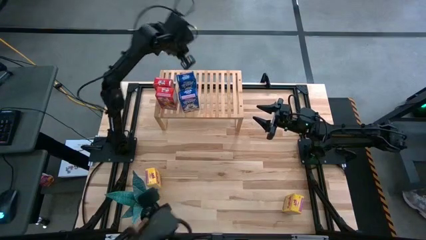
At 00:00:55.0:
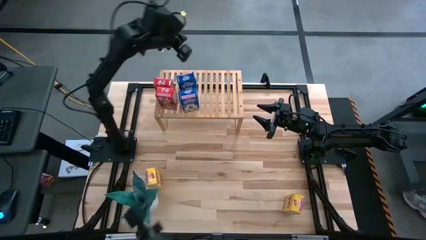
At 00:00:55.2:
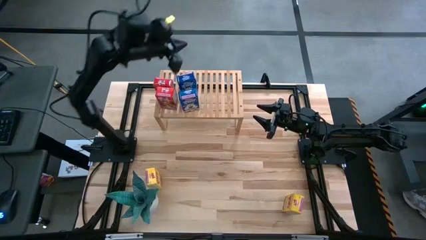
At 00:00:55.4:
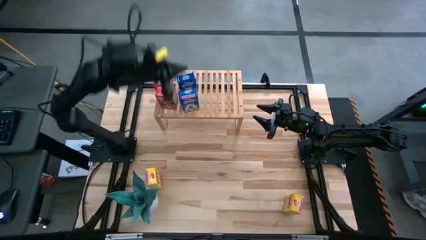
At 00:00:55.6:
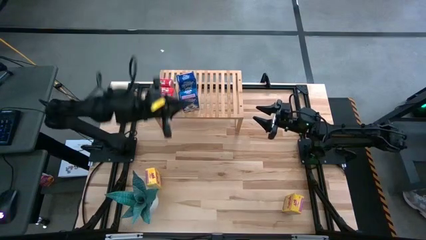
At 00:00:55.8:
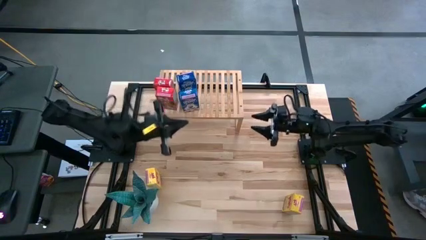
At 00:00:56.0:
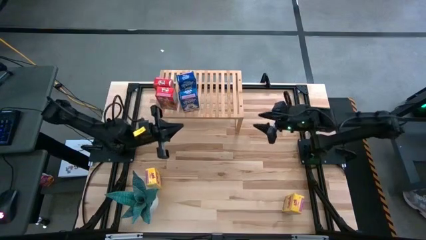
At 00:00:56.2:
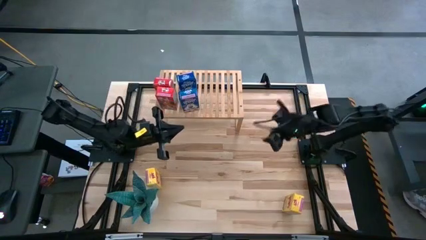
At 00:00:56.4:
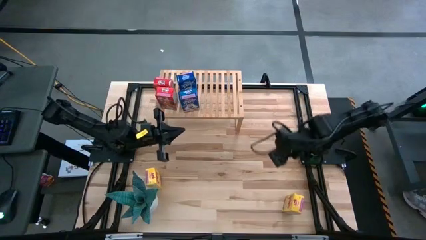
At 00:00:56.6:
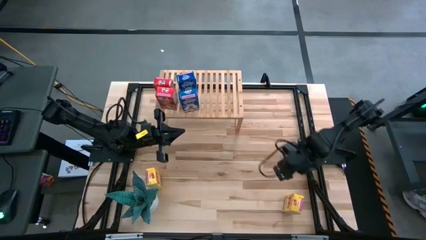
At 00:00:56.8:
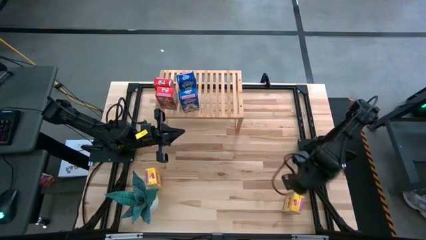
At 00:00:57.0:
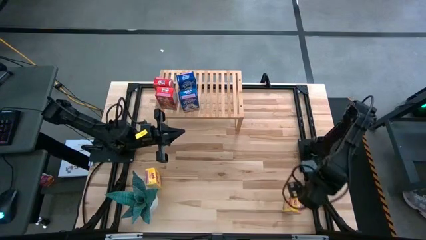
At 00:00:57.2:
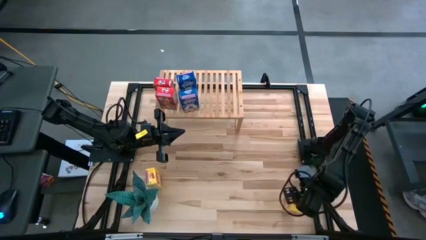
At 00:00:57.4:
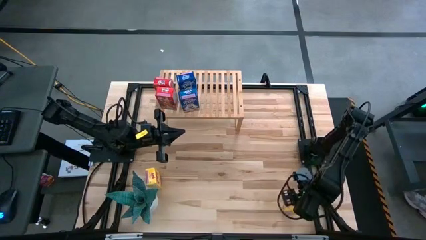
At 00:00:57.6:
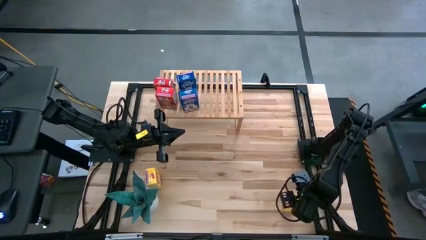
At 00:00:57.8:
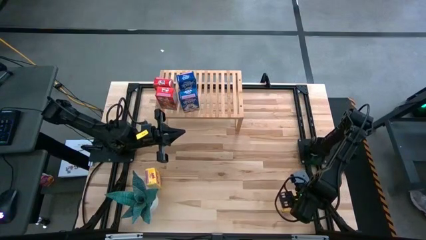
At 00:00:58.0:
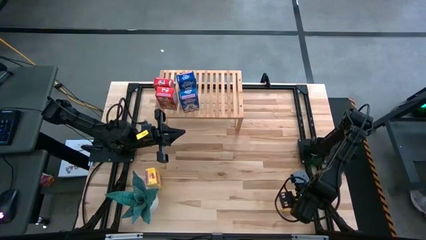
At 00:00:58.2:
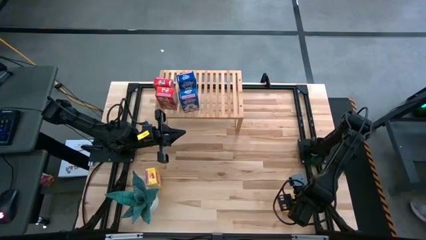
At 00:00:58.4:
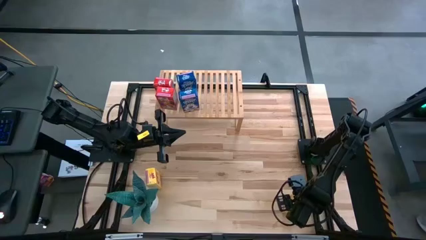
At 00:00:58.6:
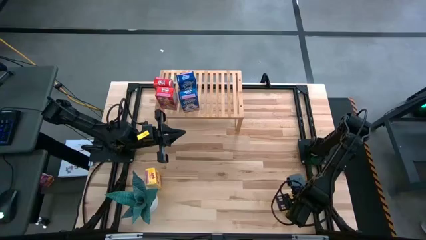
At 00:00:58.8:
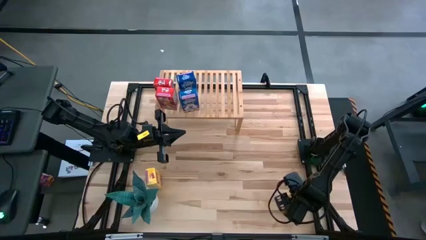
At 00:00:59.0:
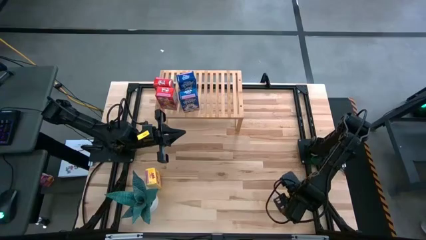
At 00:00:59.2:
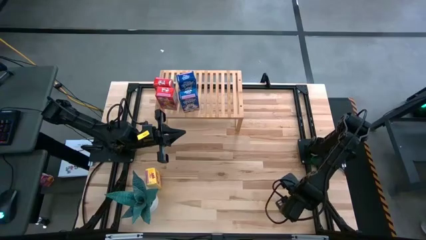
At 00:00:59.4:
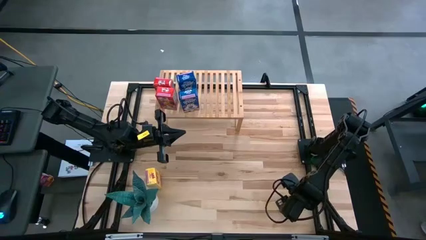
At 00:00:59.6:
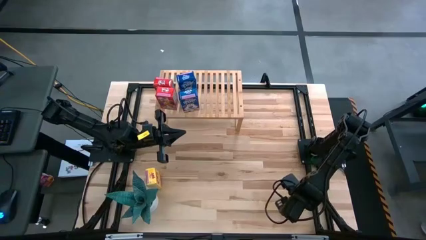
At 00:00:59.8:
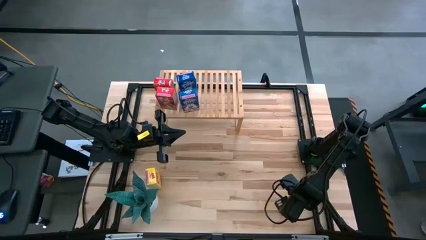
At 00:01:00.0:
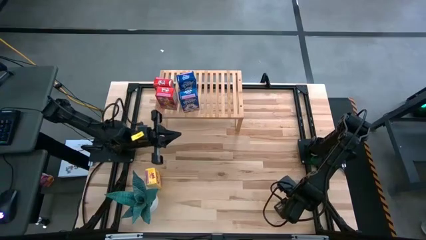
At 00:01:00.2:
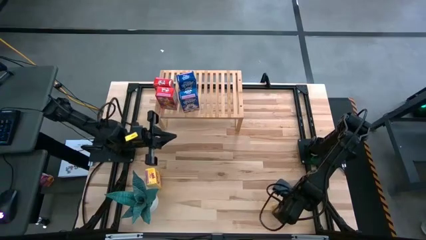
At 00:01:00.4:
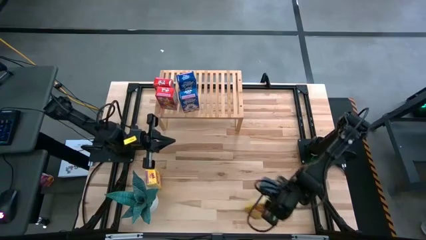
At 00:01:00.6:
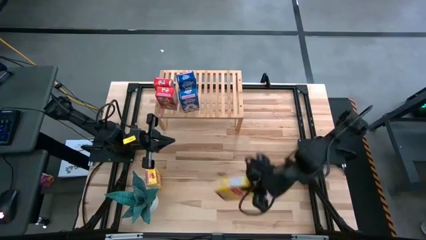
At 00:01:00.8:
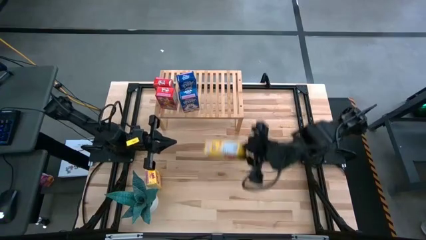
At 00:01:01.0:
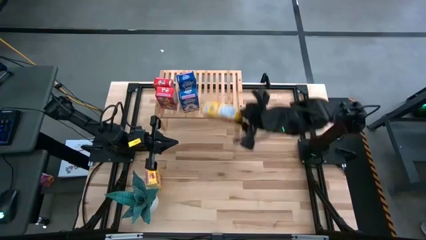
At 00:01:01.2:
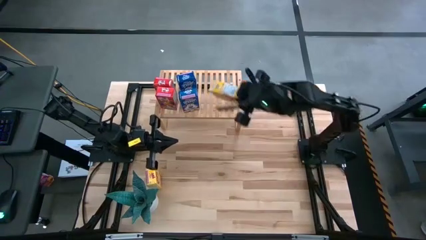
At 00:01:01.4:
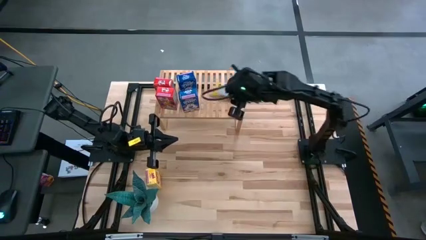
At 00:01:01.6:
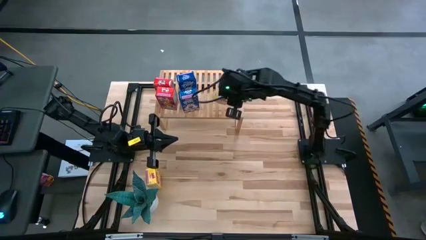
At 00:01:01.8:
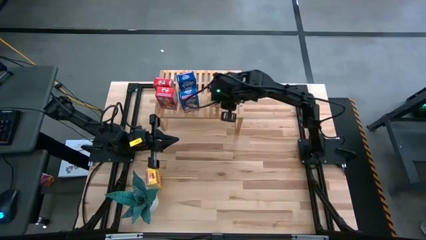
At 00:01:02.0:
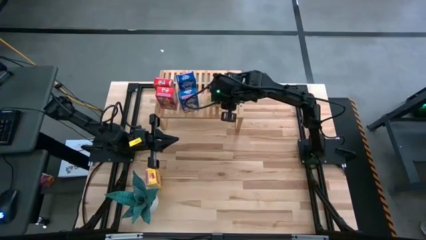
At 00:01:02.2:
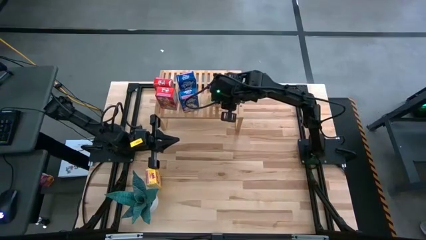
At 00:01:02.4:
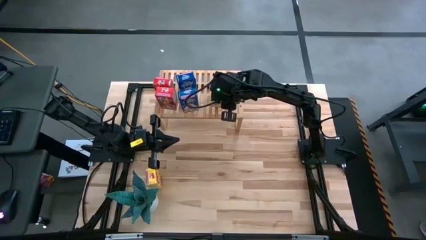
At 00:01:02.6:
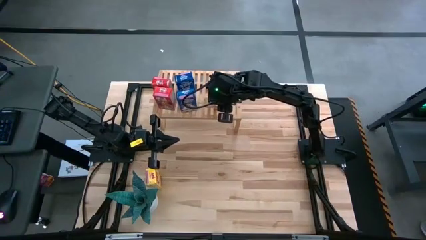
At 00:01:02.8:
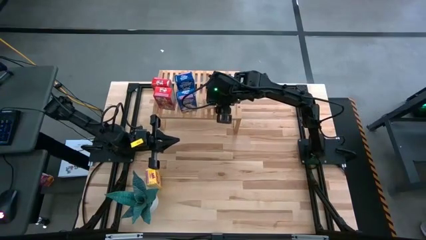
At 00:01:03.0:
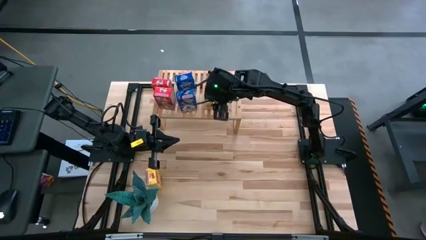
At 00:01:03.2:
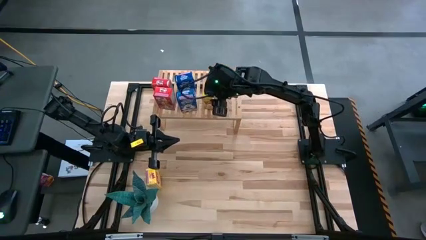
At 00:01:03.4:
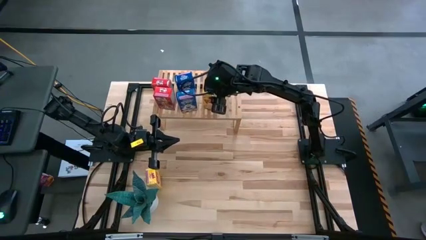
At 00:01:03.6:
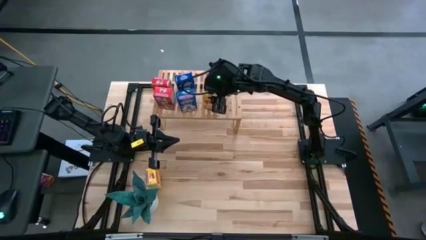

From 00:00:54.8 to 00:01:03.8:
Task: Stack cereal on shelf
Put the right yellow cereal box on the shelf

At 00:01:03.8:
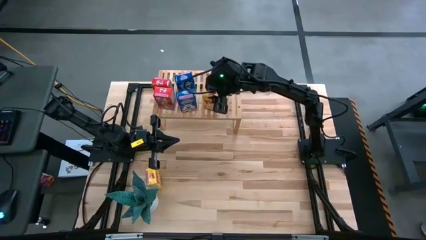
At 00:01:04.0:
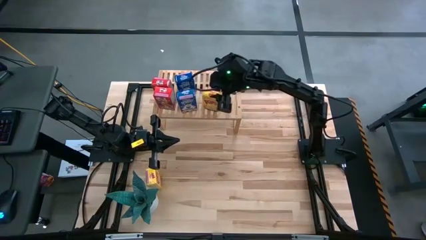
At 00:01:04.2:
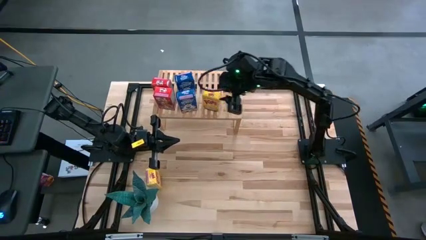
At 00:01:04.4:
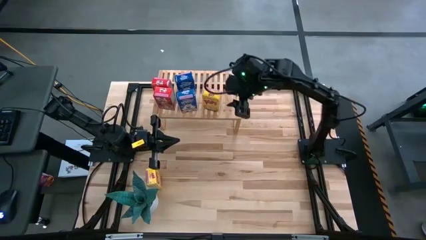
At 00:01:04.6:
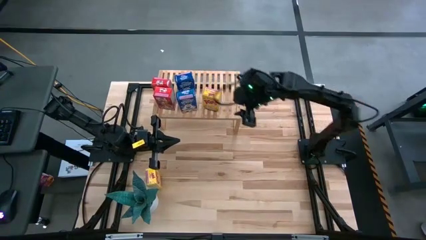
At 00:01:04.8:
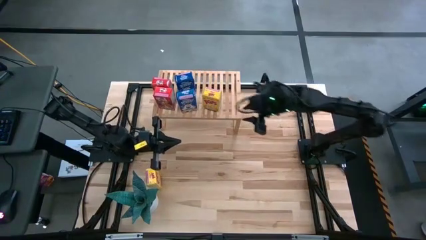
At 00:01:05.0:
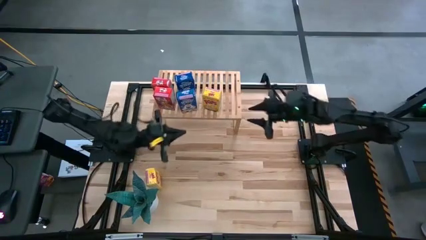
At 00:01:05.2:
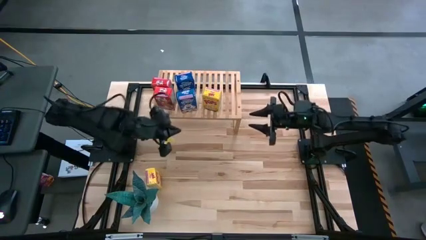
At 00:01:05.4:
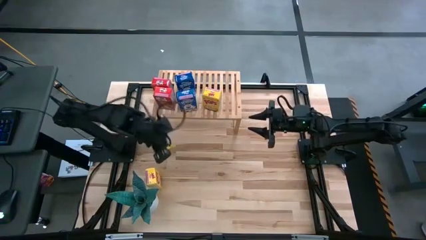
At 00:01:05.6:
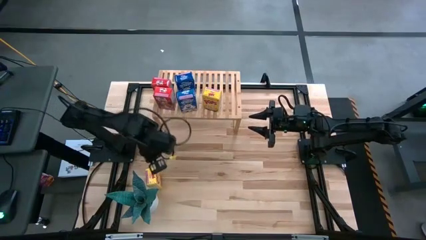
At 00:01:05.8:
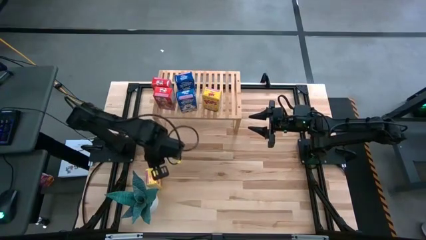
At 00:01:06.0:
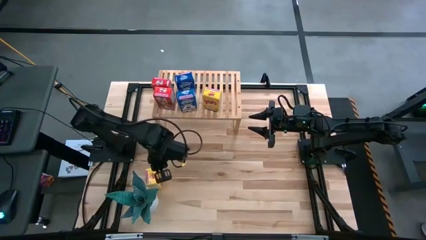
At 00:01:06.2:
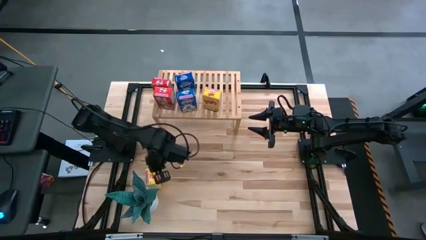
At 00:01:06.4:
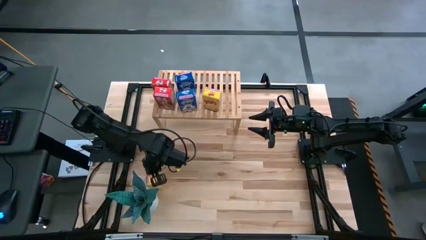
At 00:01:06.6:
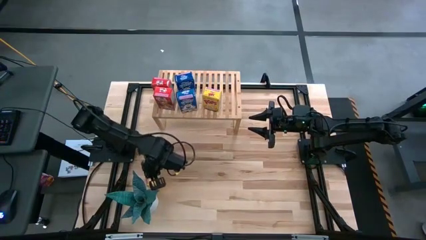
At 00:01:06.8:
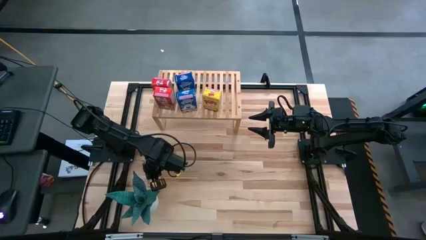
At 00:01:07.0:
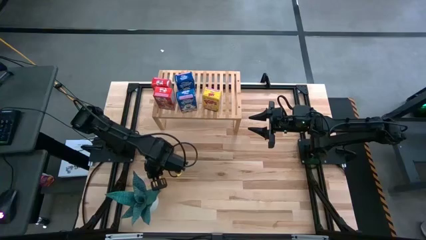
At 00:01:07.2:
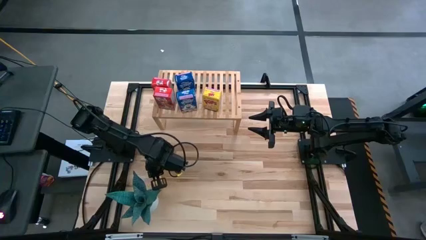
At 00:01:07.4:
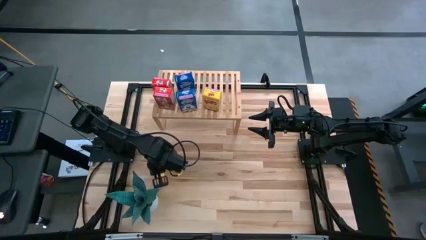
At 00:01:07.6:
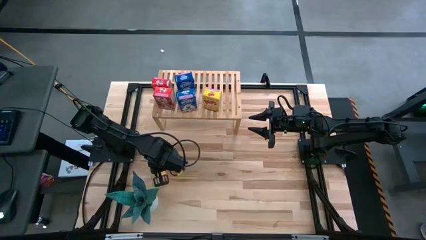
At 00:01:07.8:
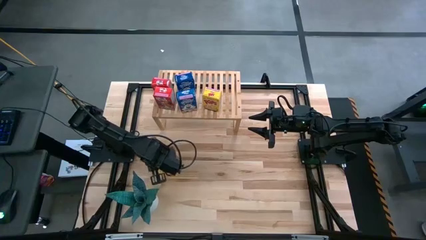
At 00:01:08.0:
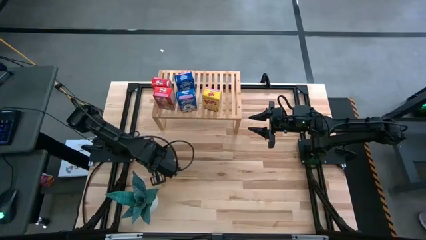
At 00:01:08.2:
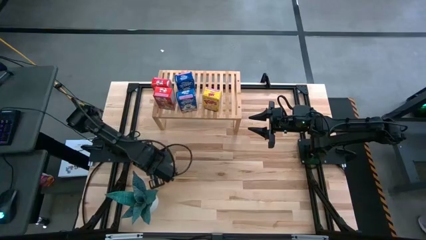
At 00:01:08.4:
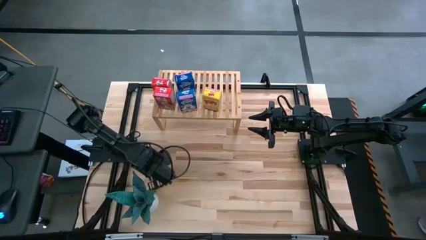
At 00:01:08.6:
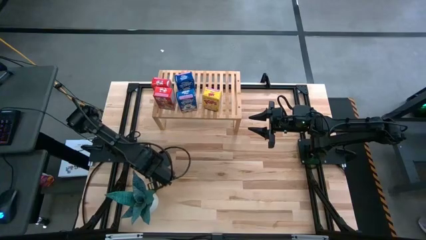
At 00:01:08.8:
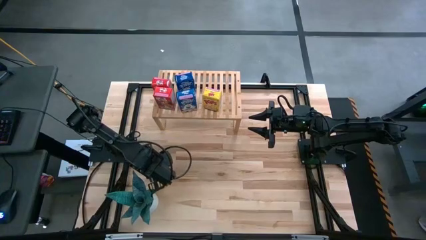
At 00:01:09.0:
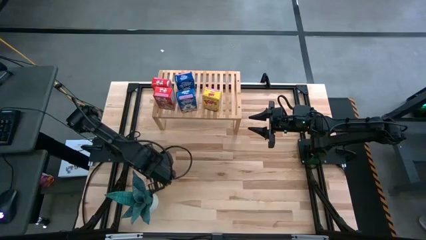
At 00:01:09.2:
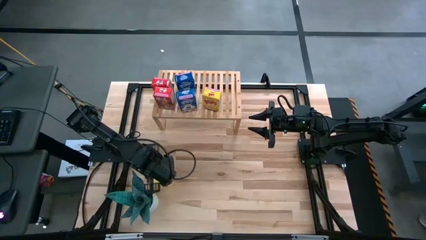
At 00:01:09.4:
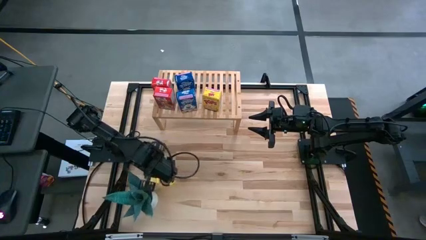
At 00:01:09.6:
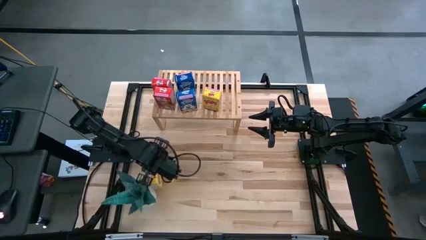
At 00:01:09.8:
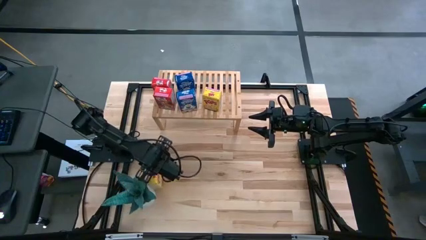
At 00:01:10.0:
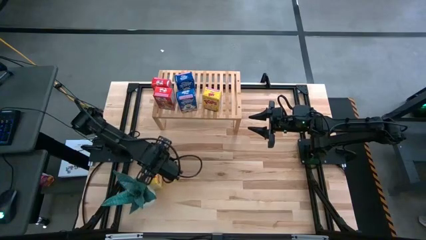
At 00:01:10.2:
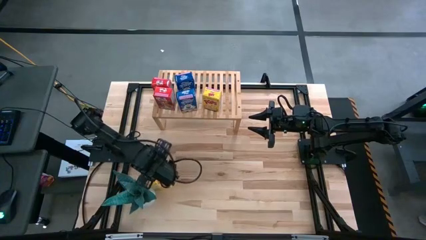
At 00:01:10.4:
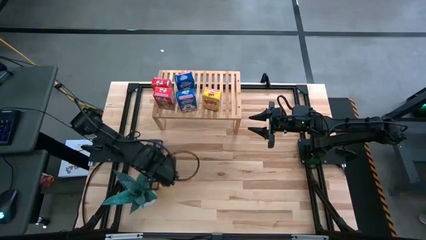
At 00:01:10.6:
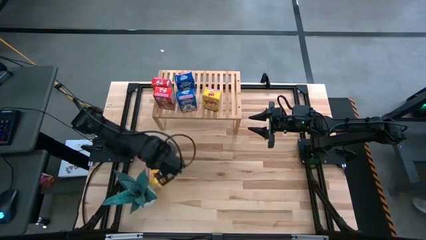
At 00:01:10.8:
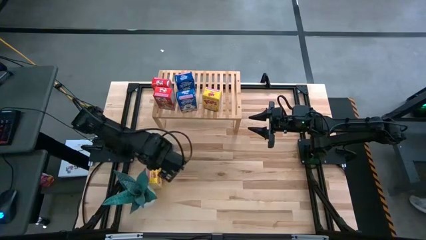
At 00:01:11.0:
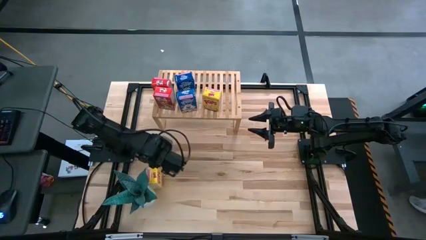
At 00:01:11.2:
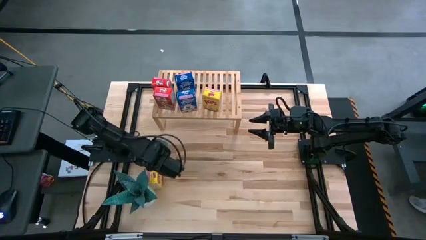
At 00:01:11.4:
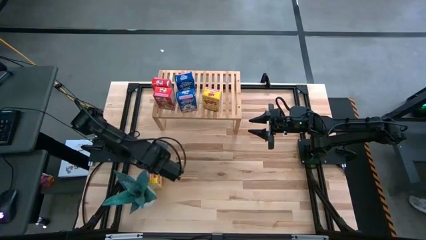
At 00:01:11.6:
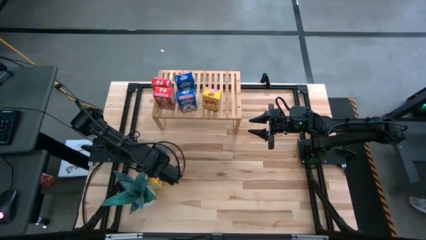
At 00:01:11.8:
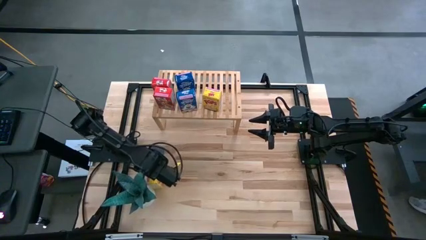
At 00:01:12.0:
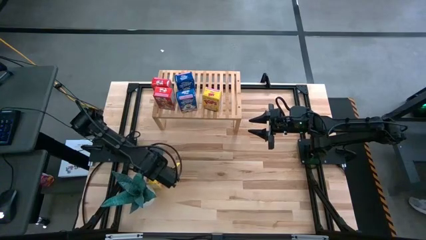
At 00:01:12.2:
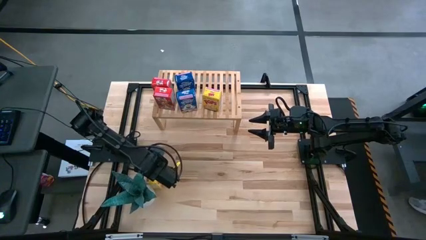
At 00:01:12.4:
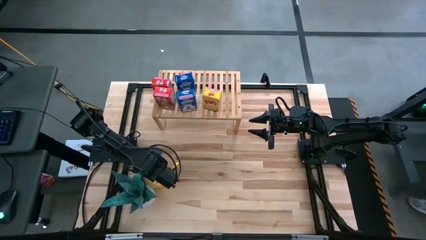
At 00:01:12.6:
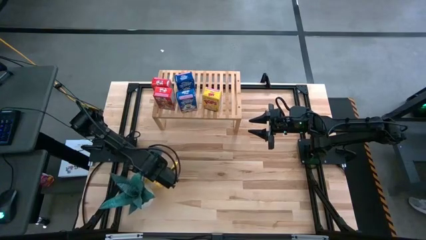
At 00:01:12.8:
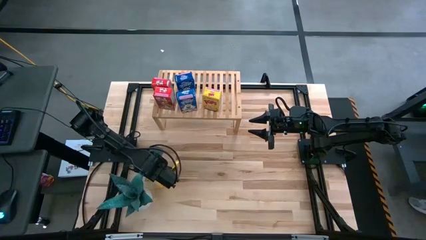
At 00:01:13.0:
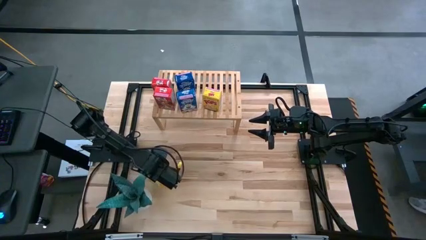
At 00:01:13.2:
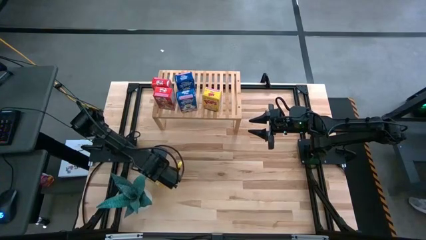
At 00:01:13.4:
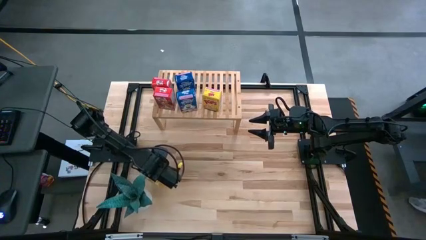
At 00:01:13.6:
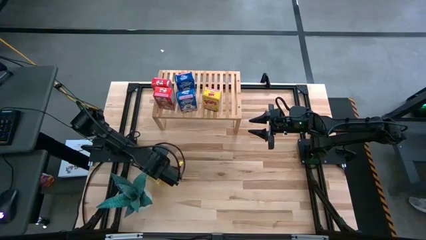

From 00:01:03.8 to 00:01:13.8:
Put the yellow cereal box on the shelf aligned with the other yellow cereal box
